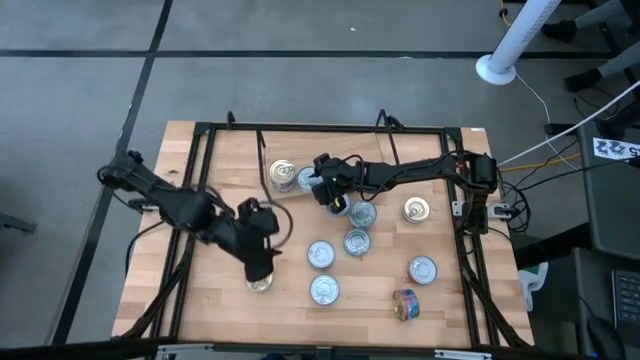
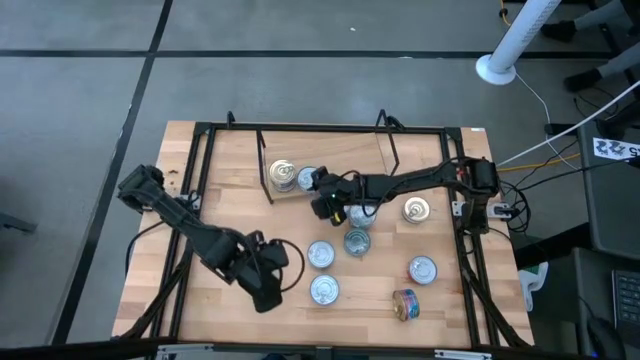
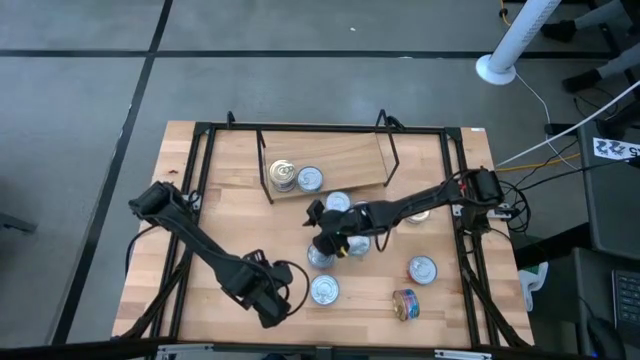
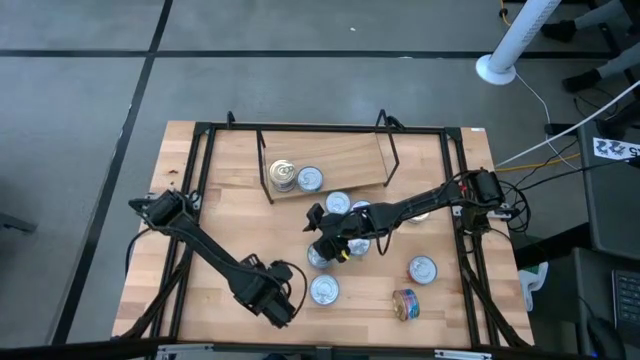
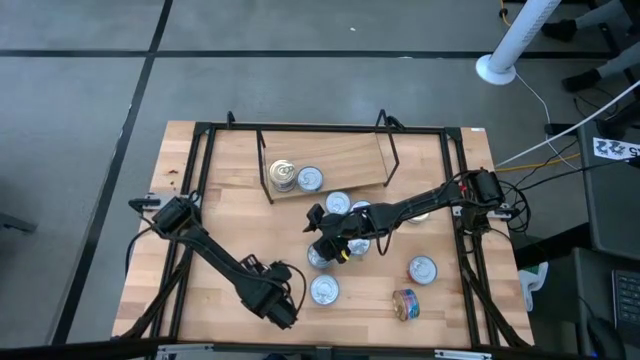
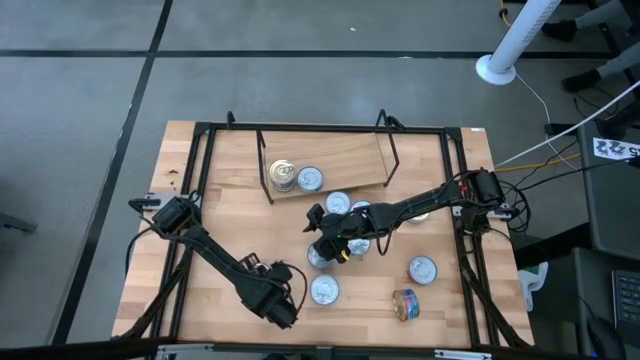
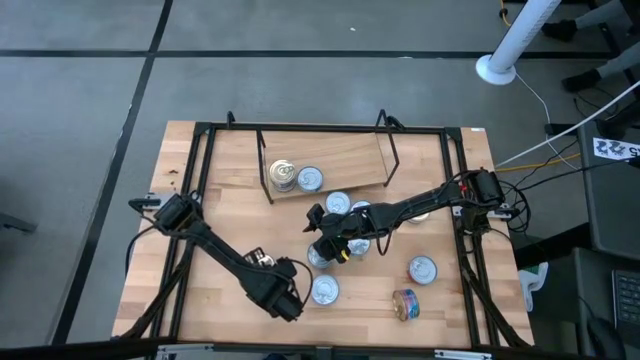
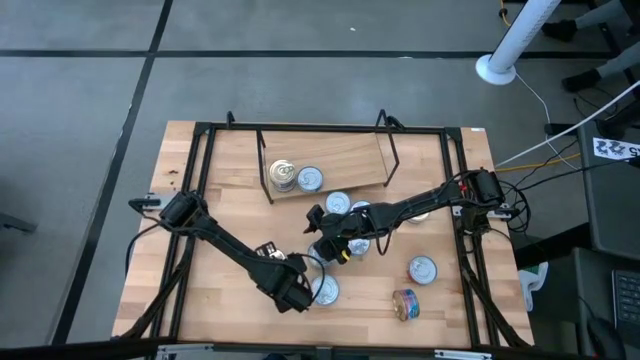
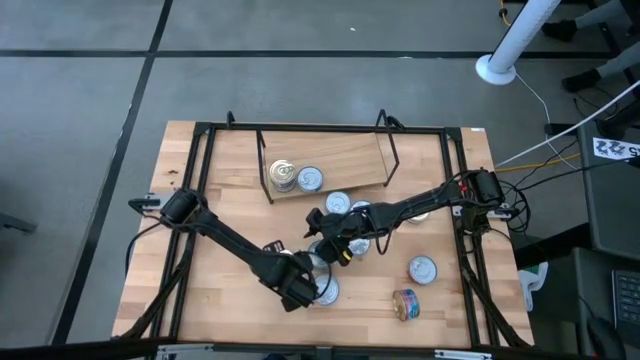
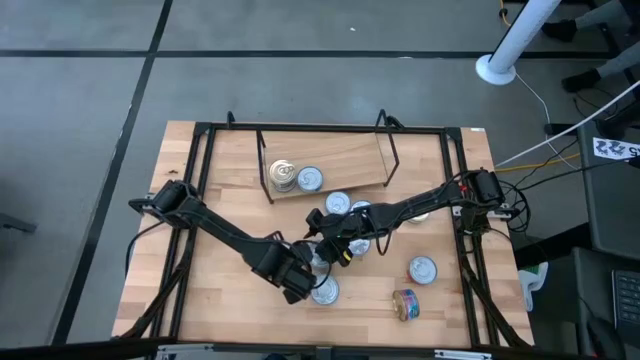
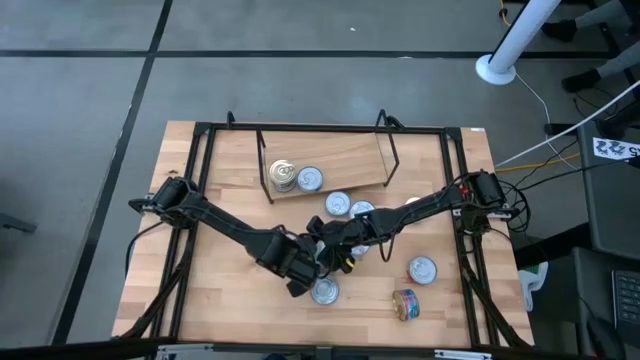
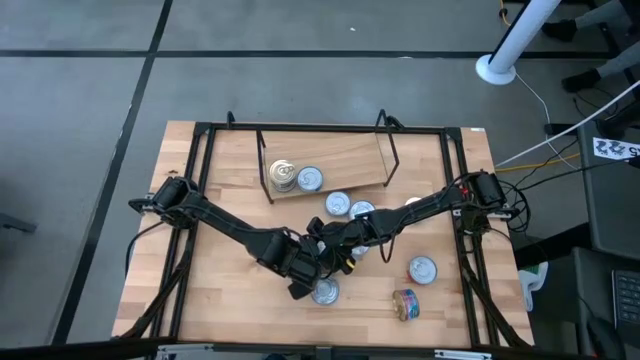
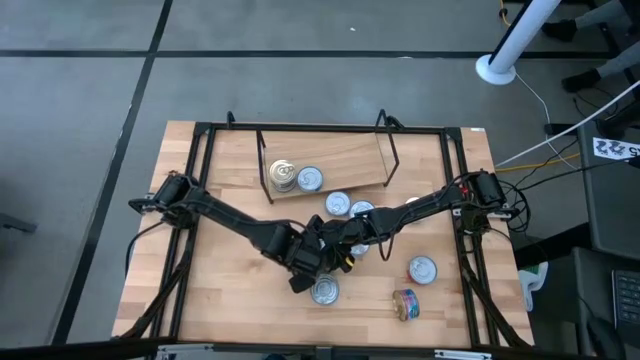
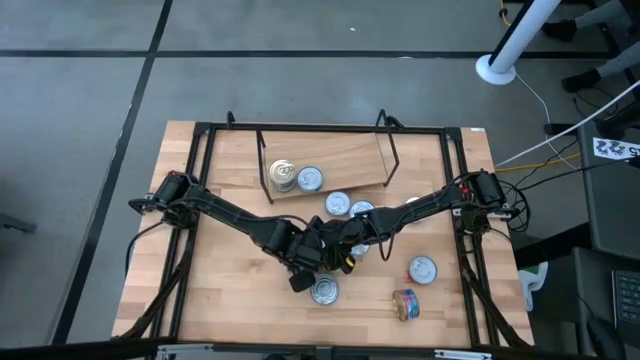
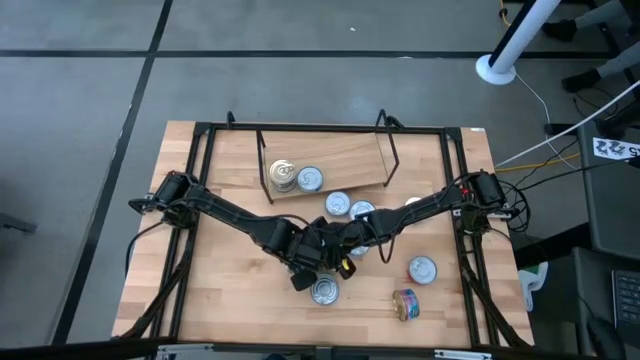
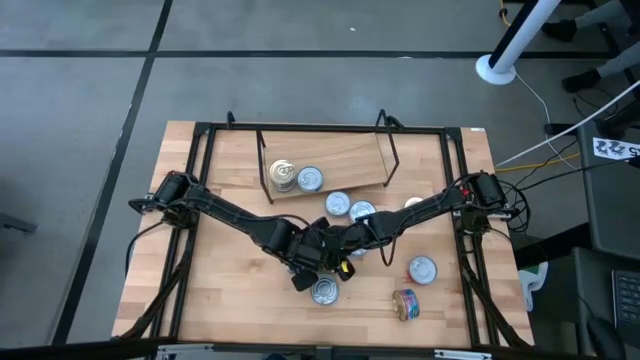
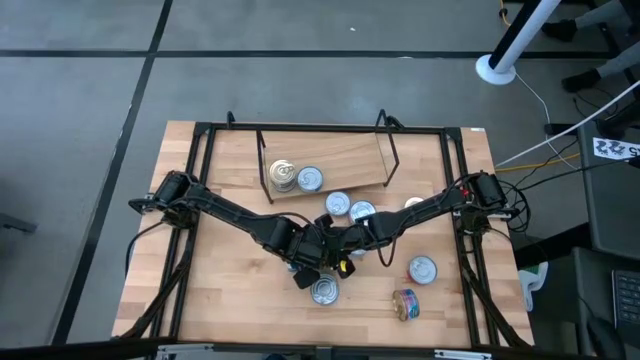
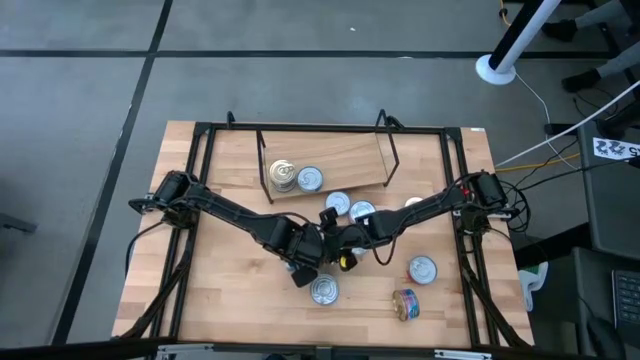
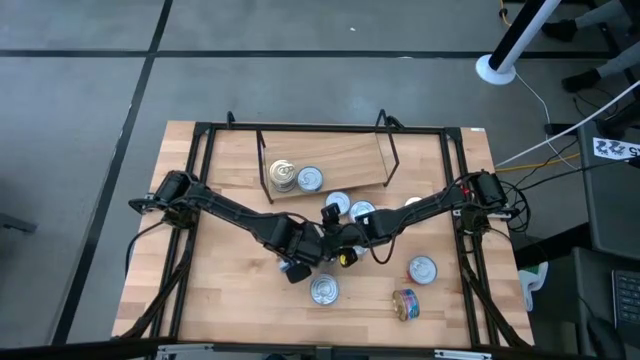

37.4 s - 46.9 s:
Task: Stack canned seafood by type on shelf
Stack the blue and pink tuna can on top of the other blue tuna cans on the shelf

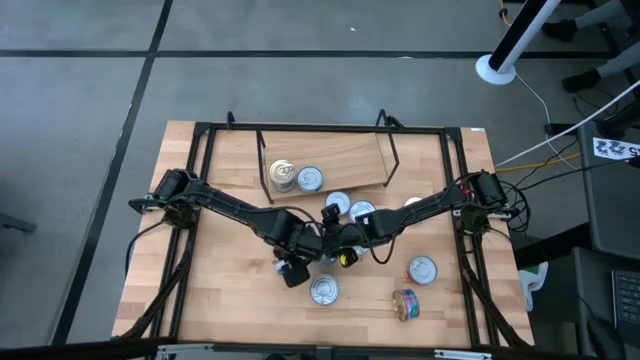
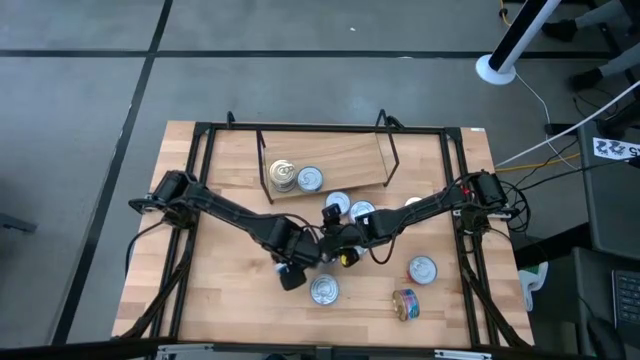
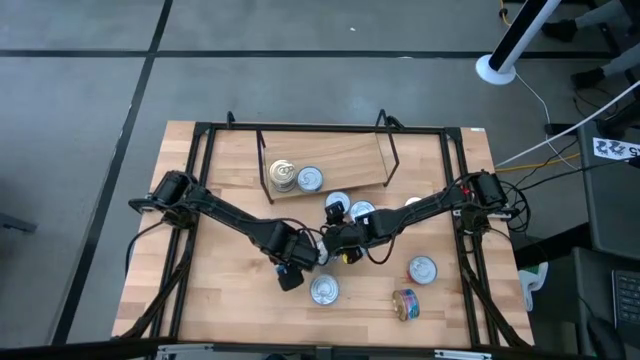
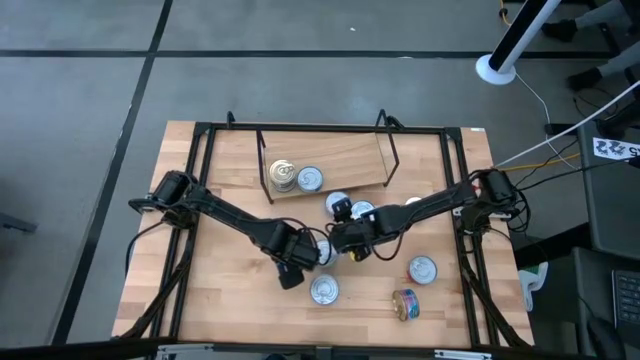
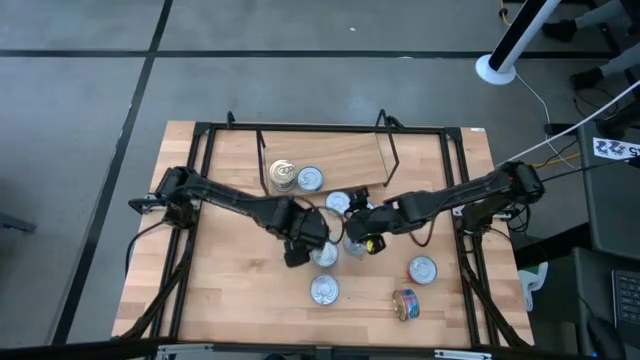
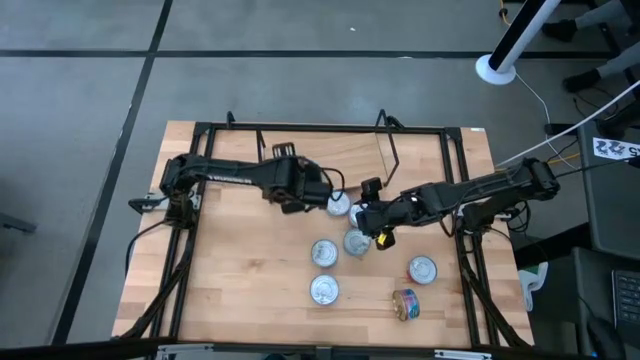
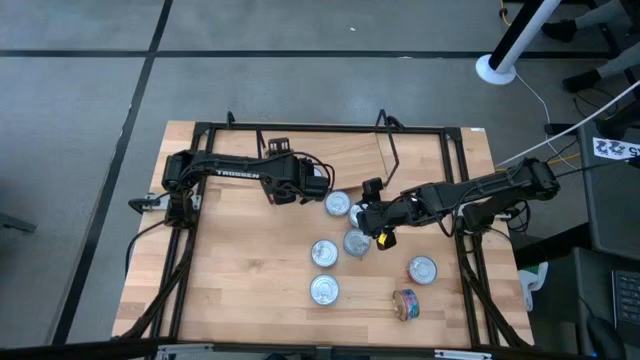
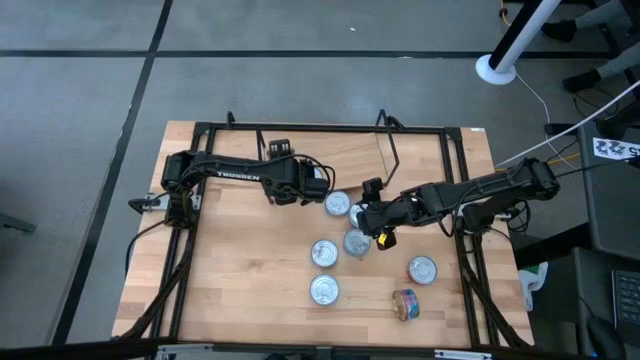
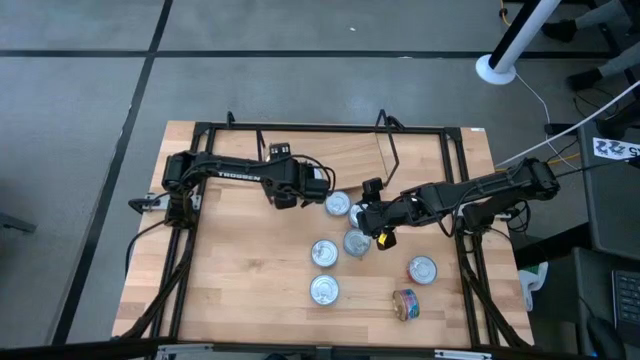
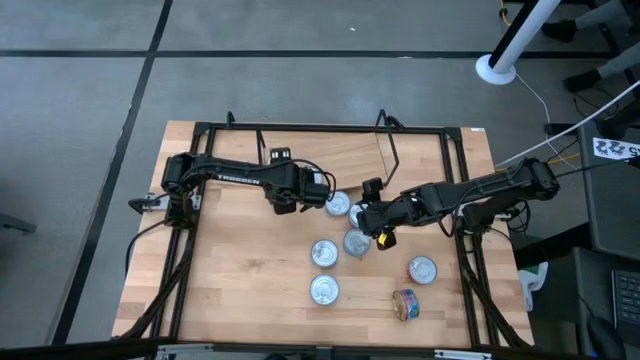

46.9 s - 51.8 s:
Stack the blue pink tuna can on top of the other blue tuna cans on the shelf

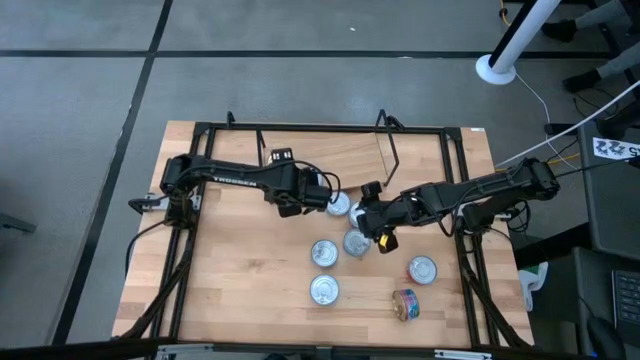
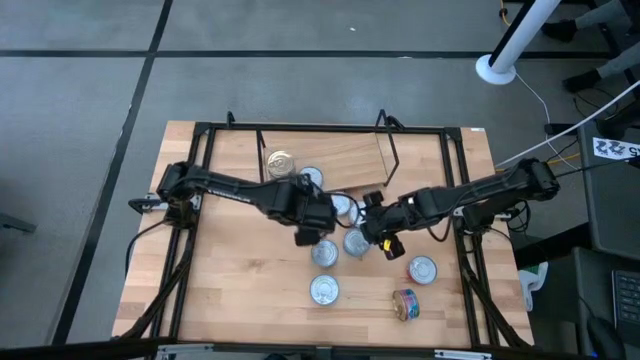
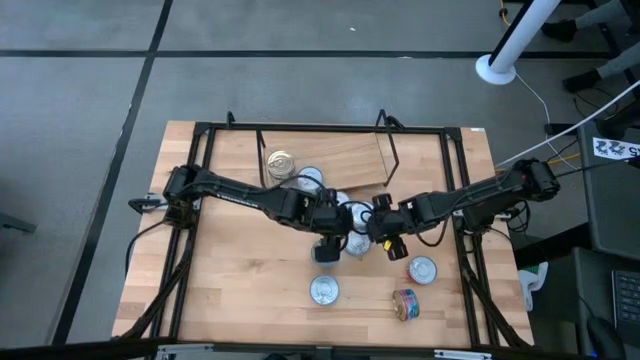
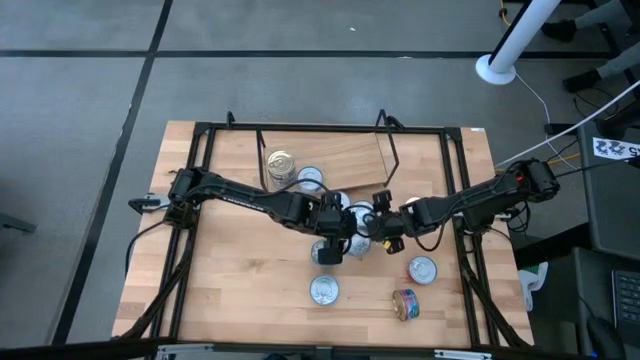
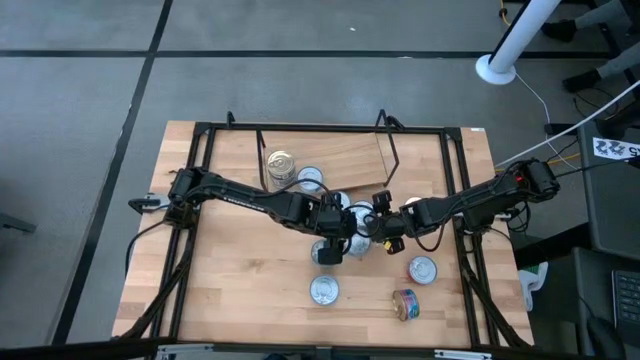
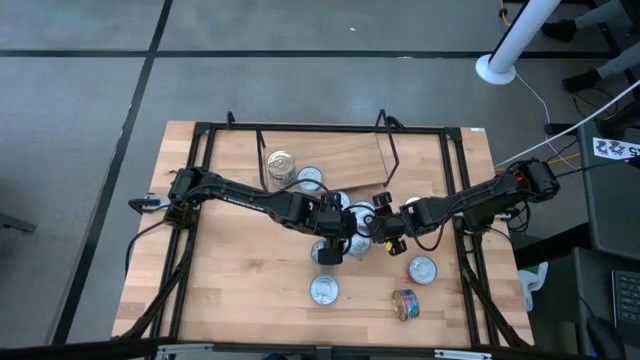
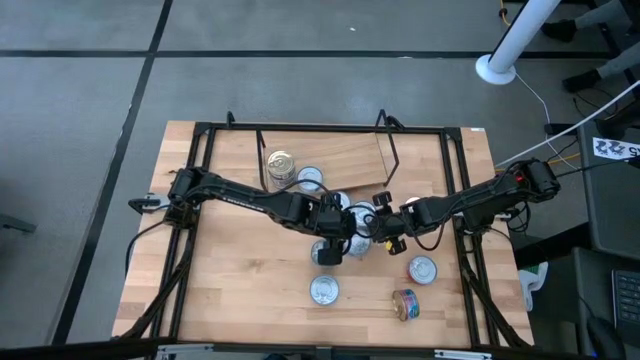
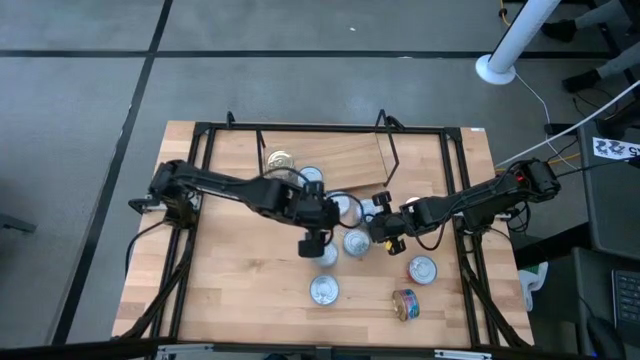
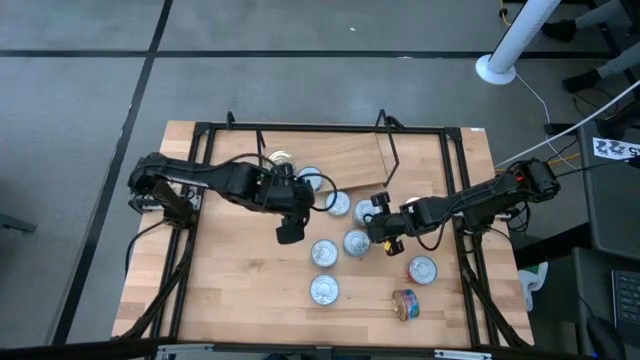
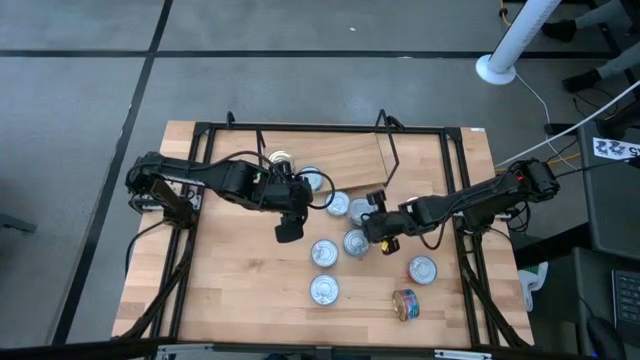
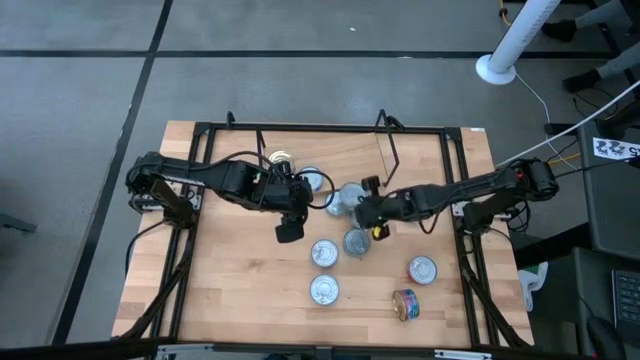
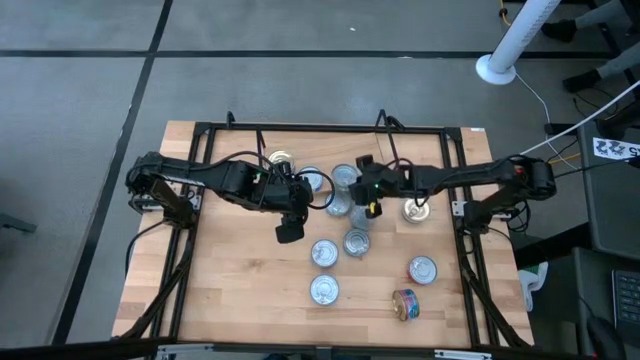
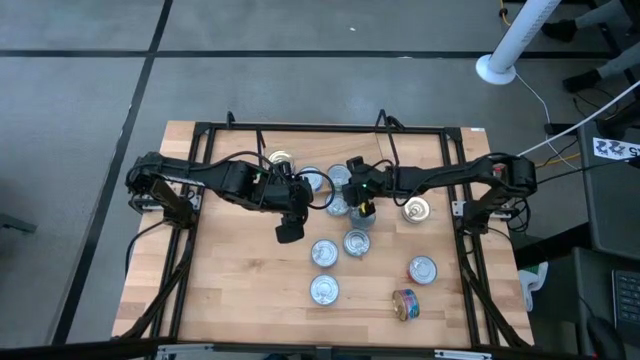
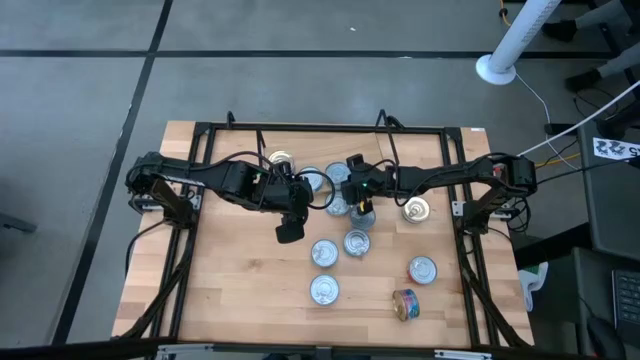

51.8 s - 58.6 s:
Put the top green tuna can on the shelf
